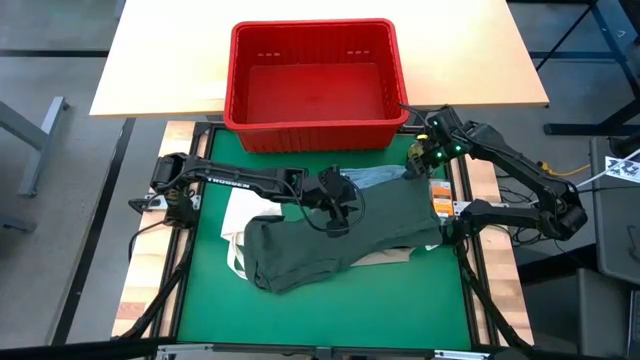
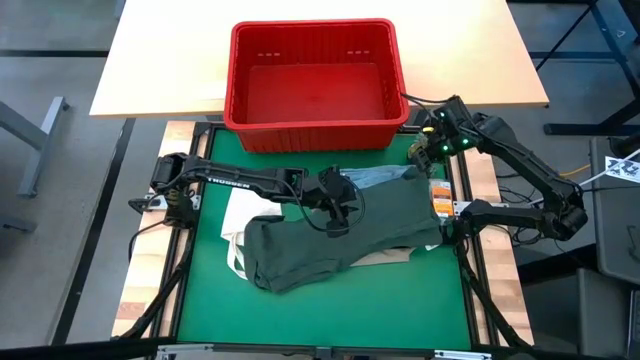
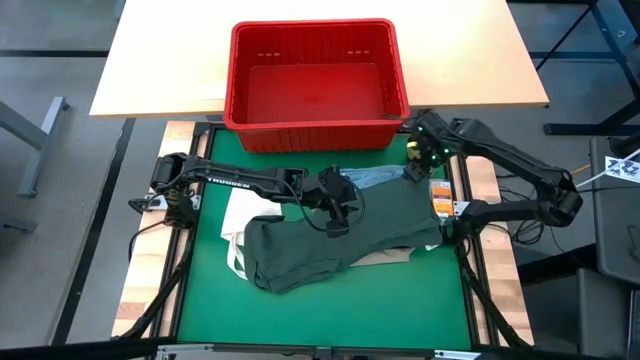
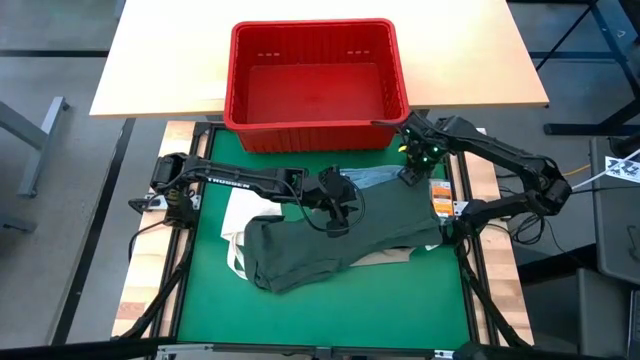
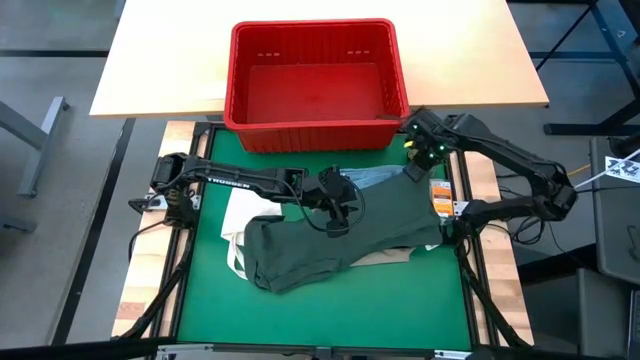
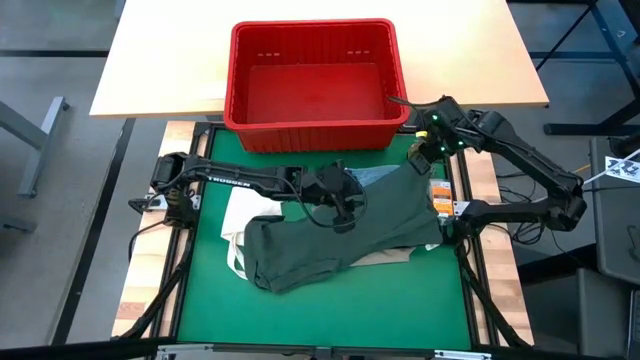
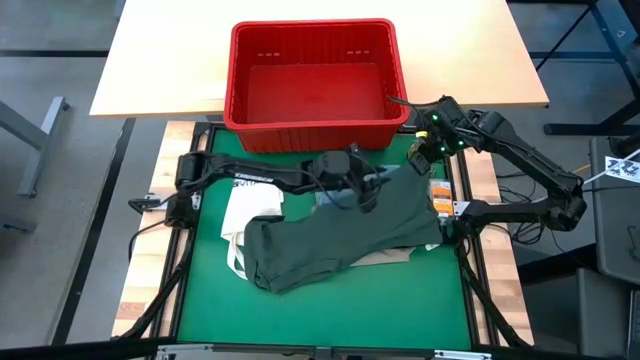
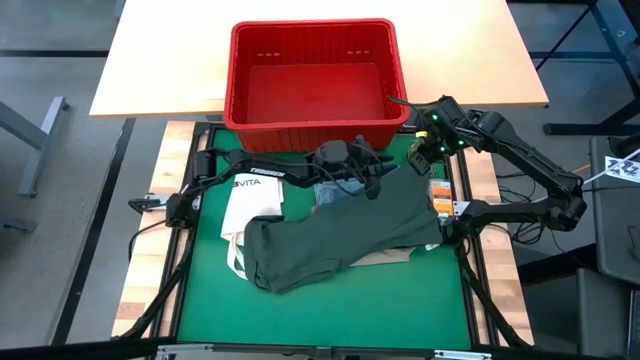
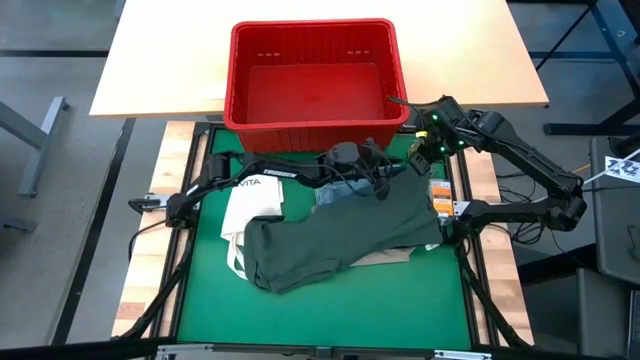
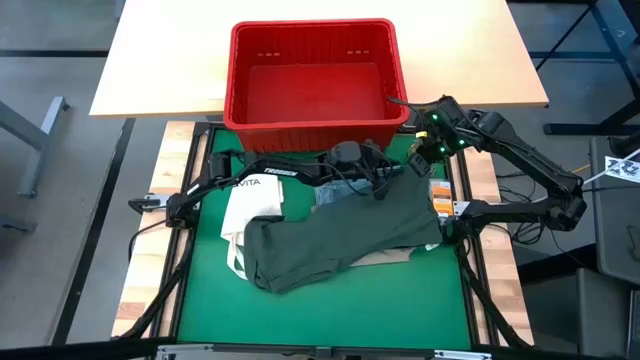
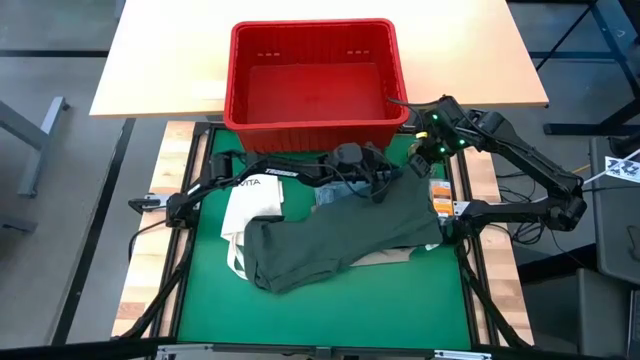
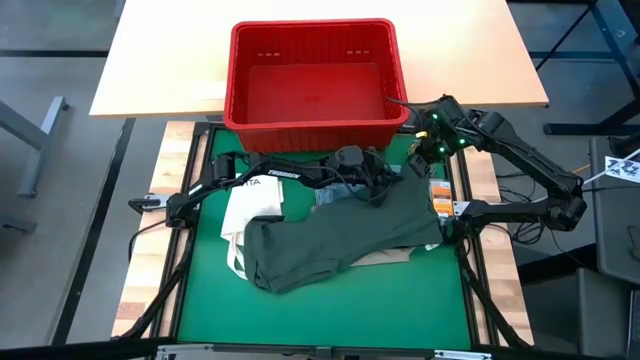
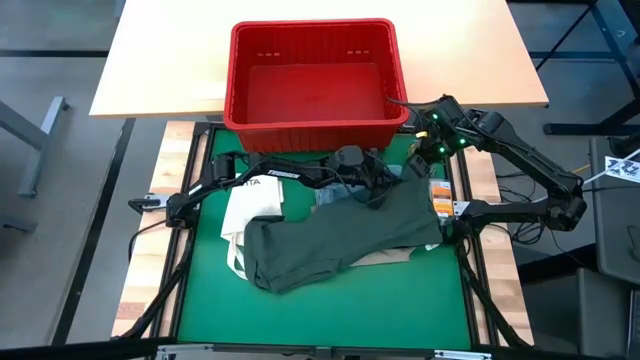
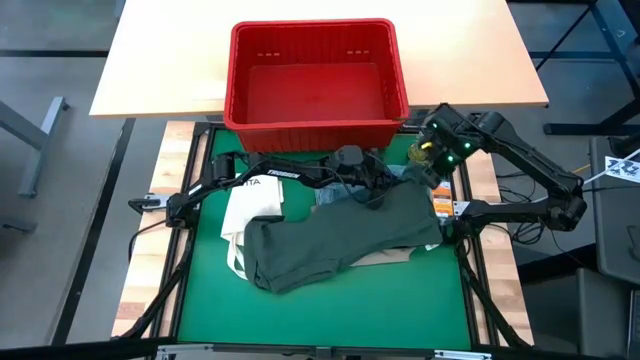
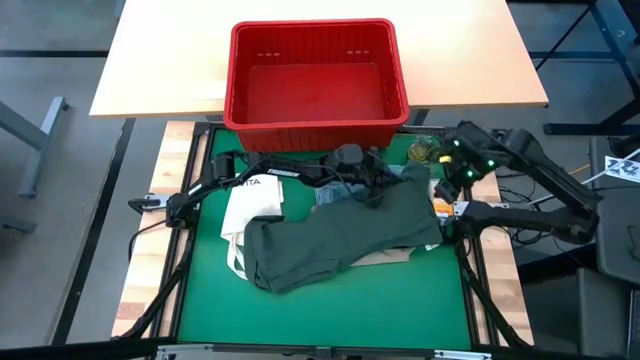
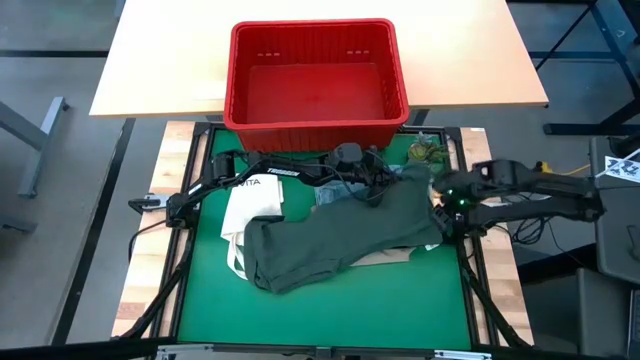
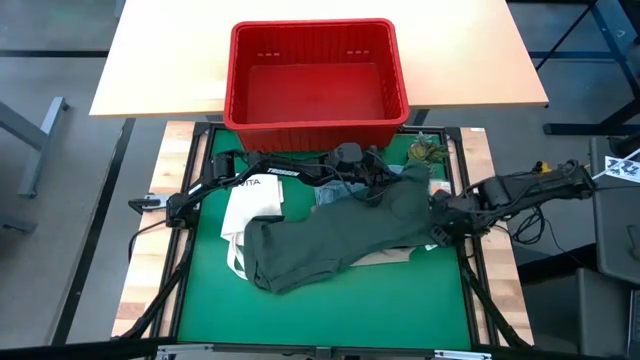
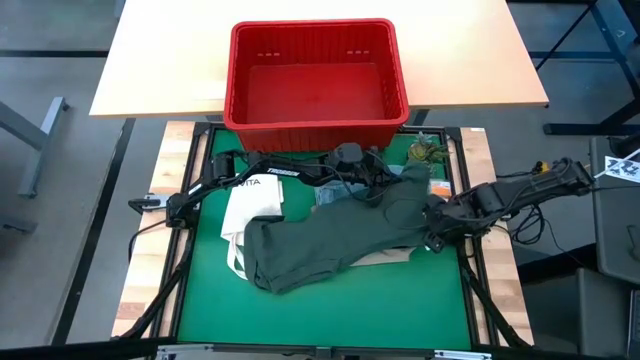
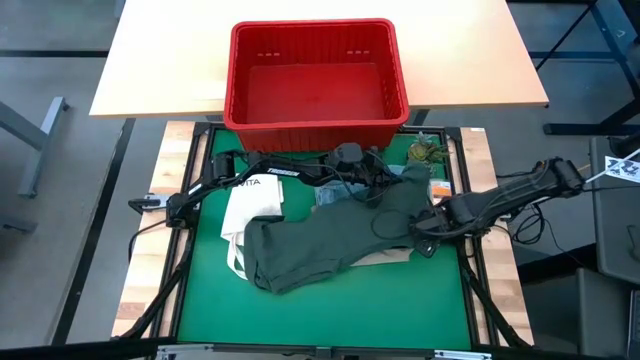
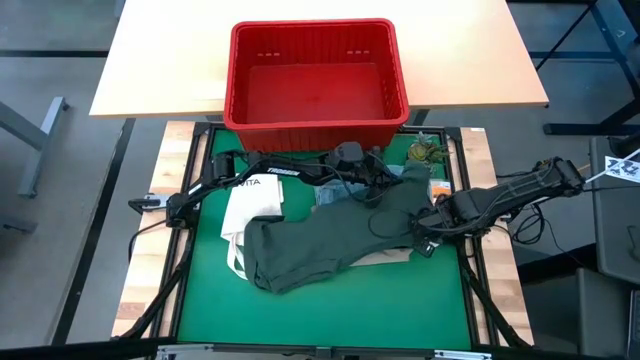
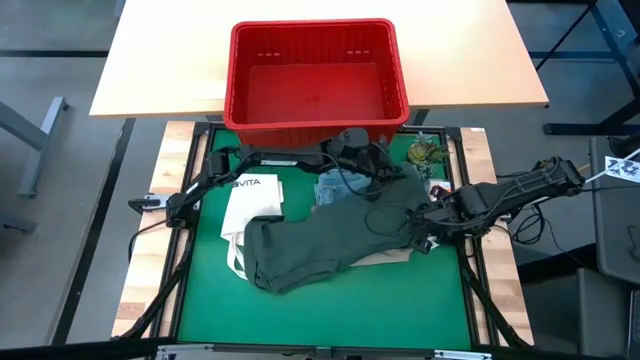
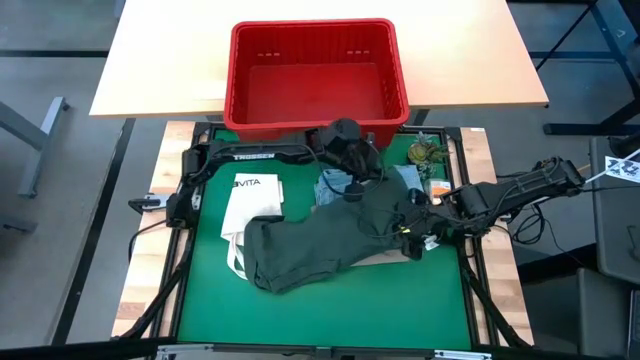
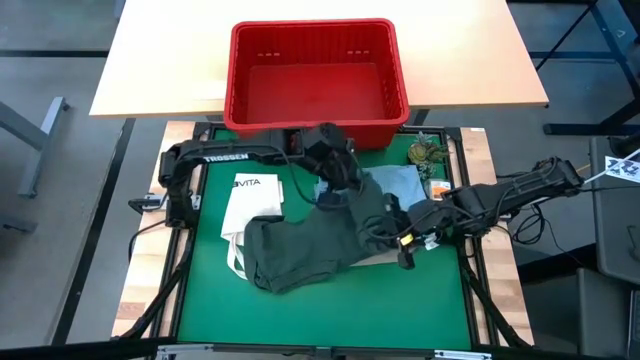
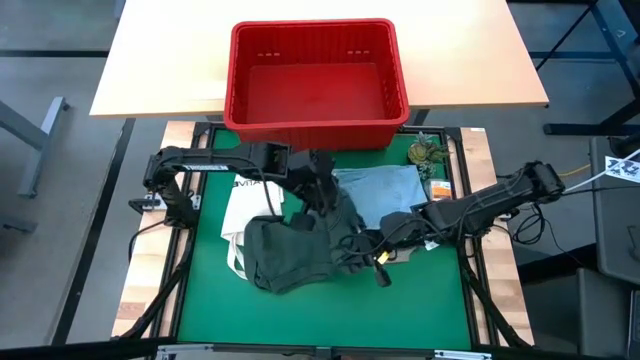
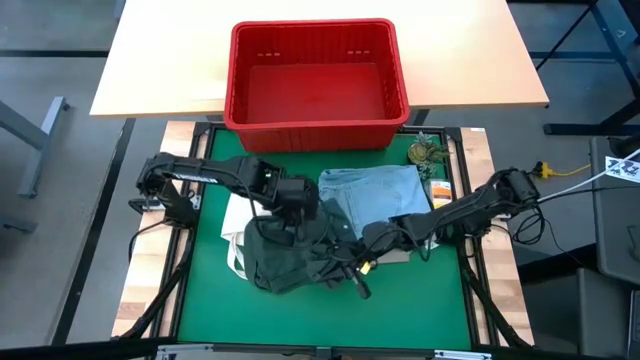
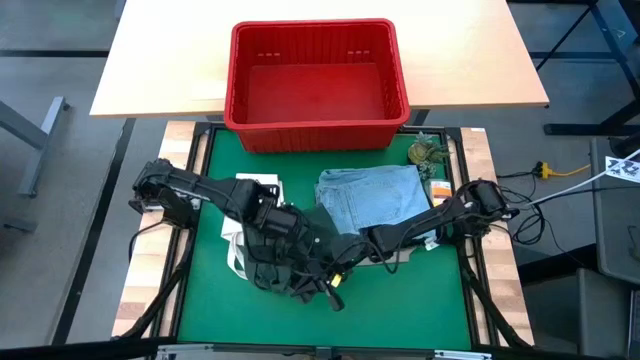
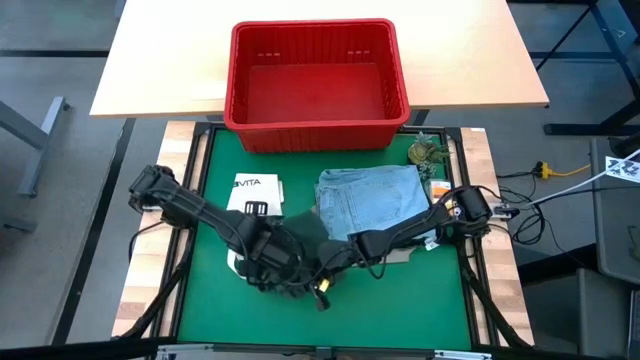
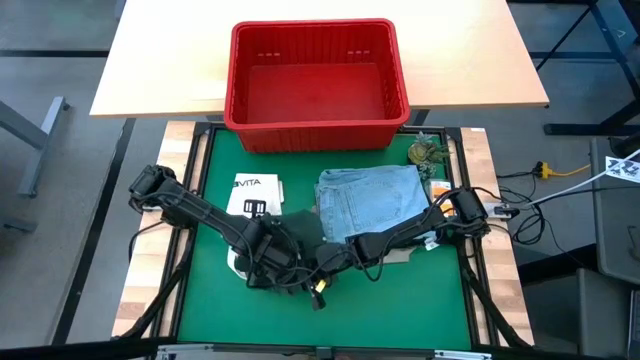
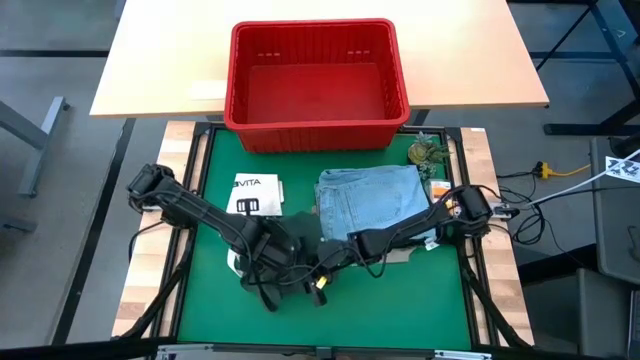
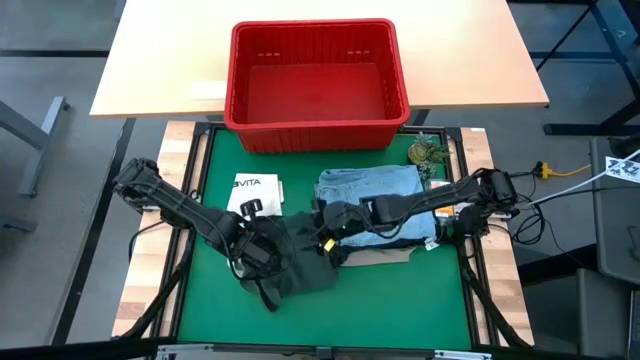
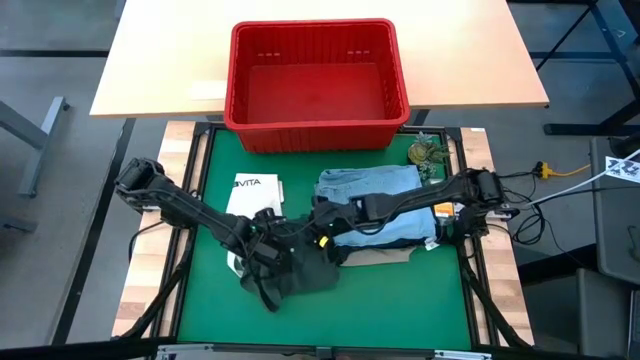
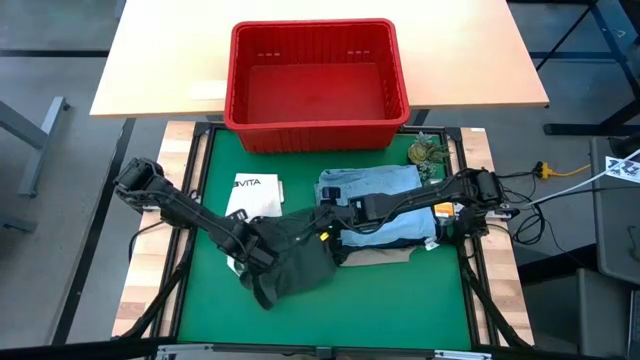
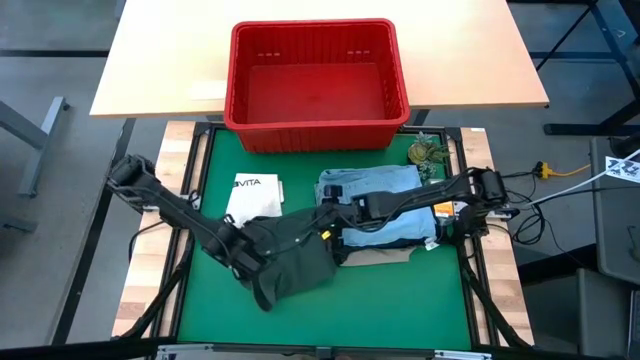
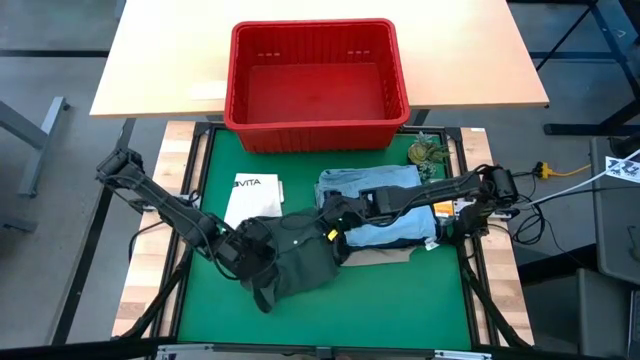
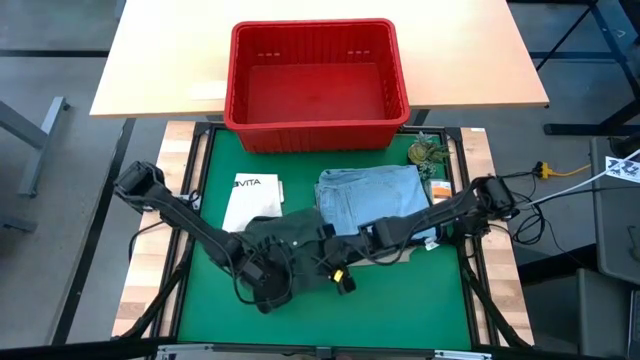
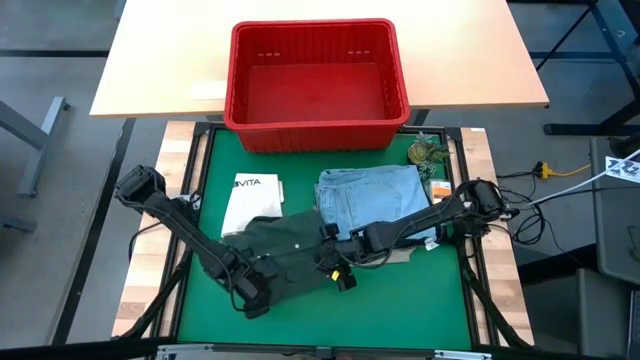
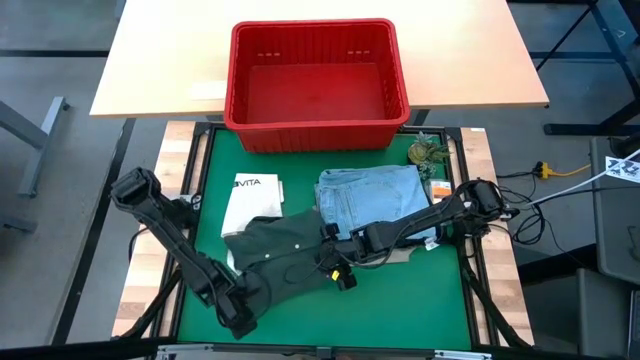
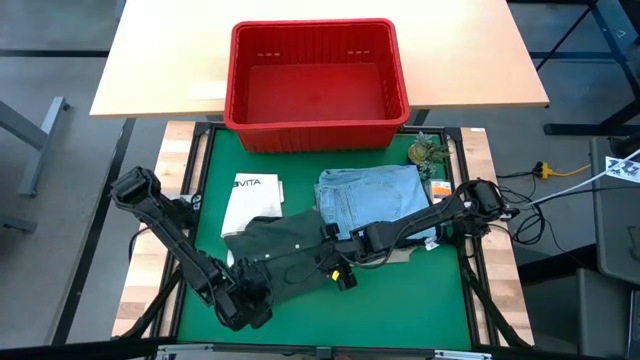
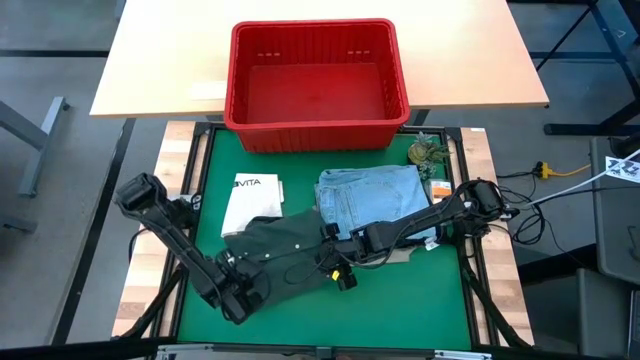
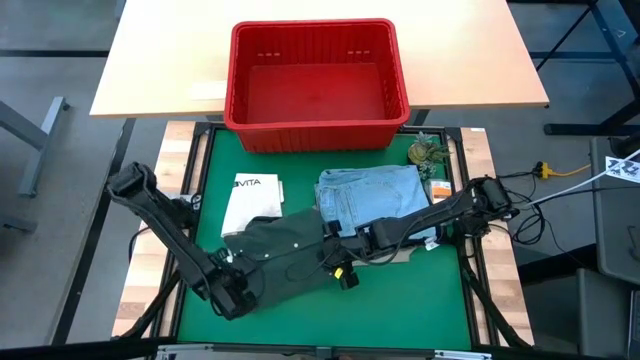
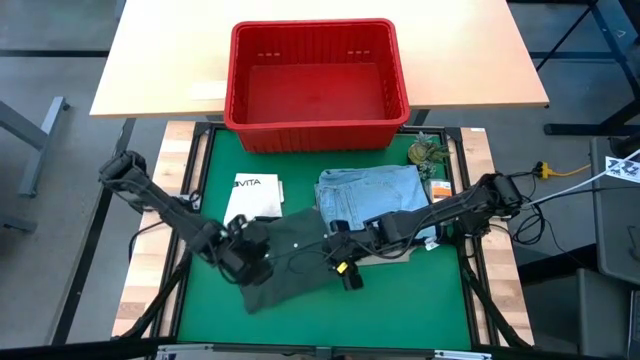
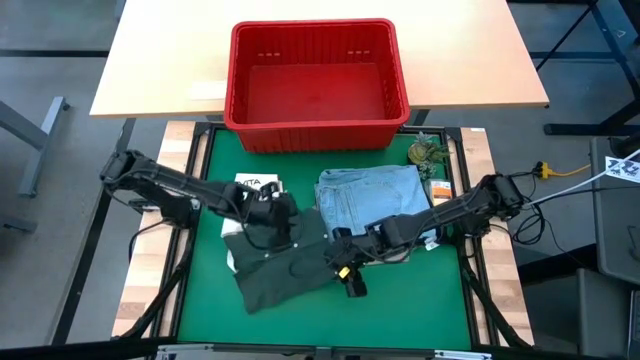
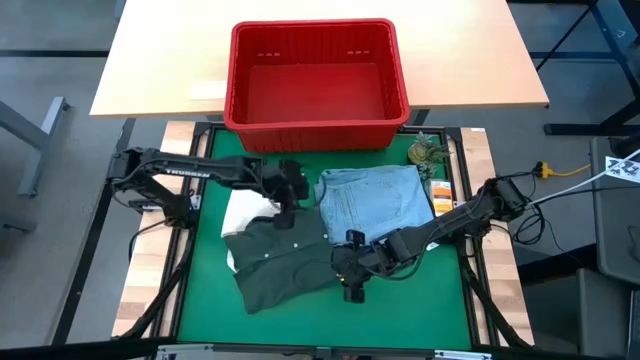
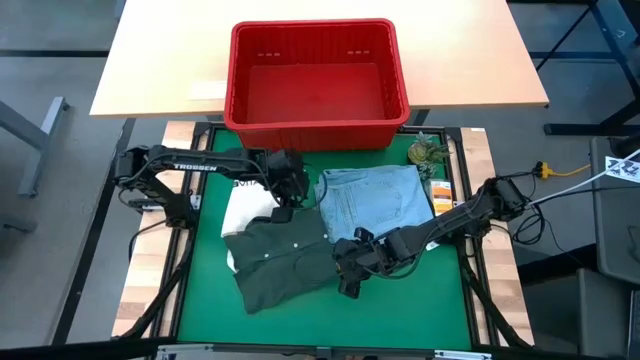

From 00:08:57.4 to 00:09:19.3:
Task: Fold Laundry from Bin
Fold the green shirt
